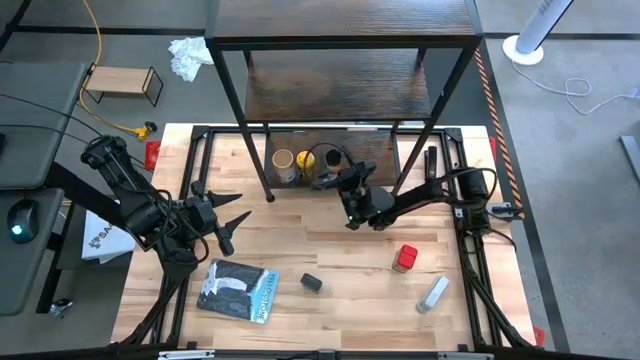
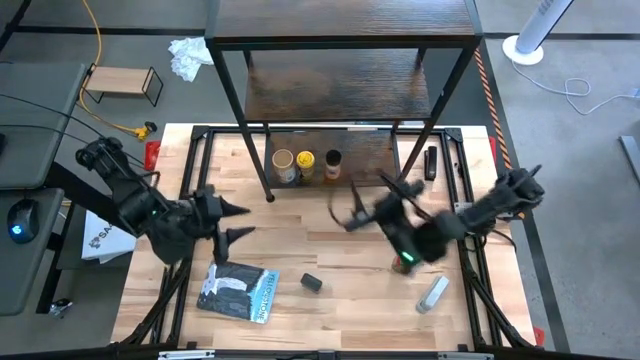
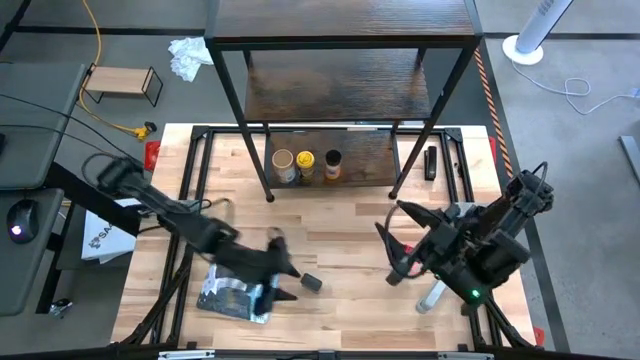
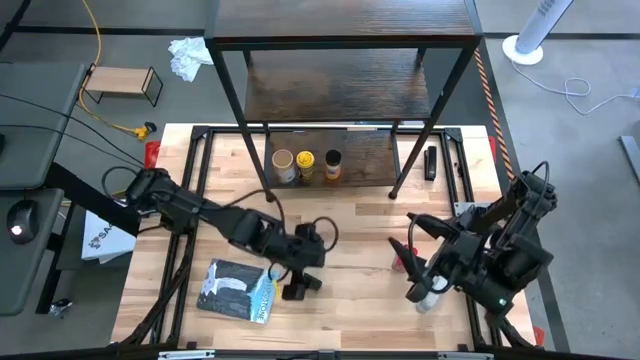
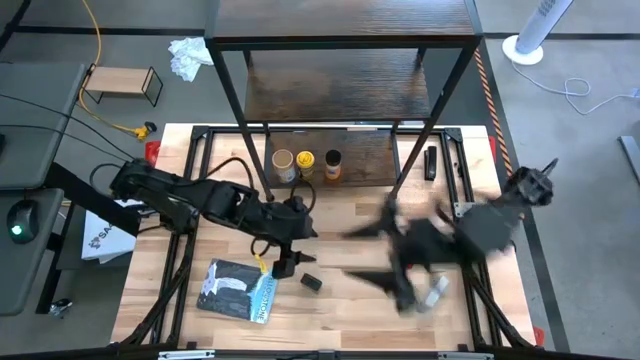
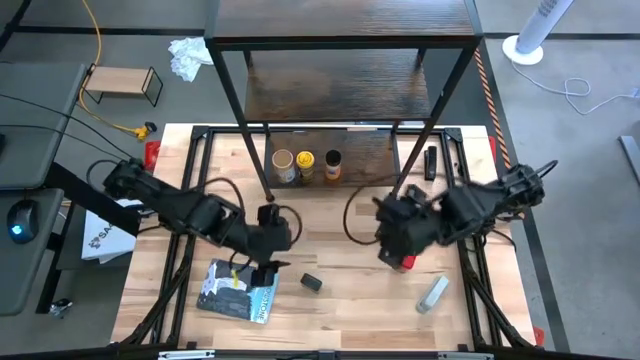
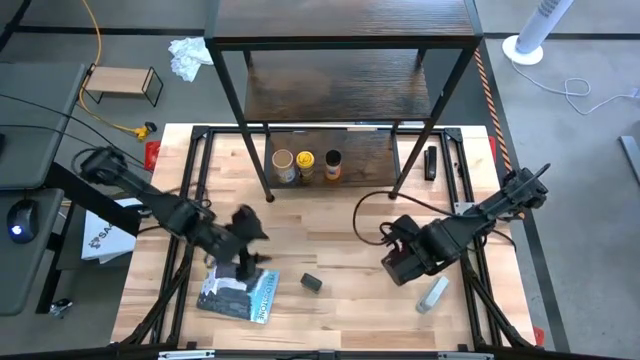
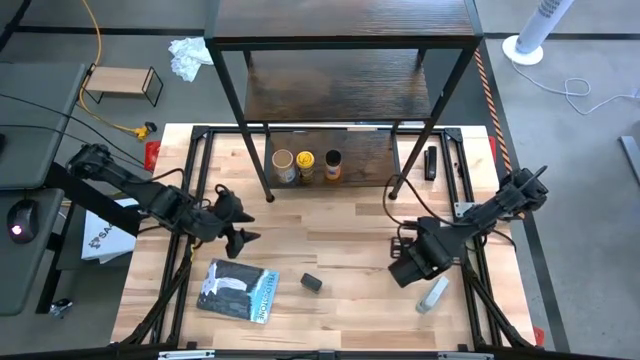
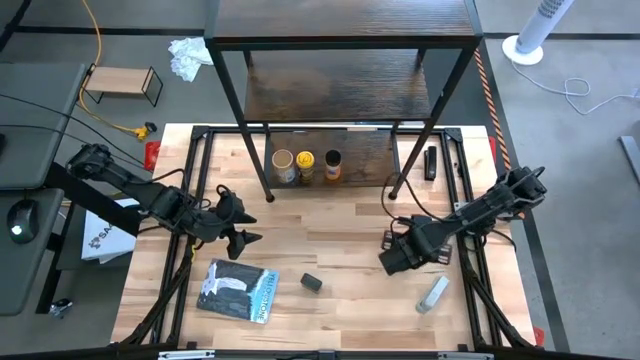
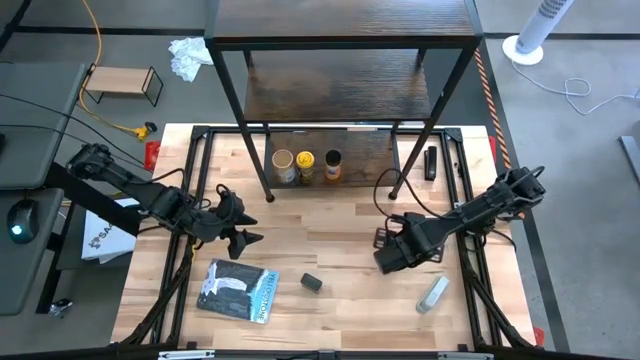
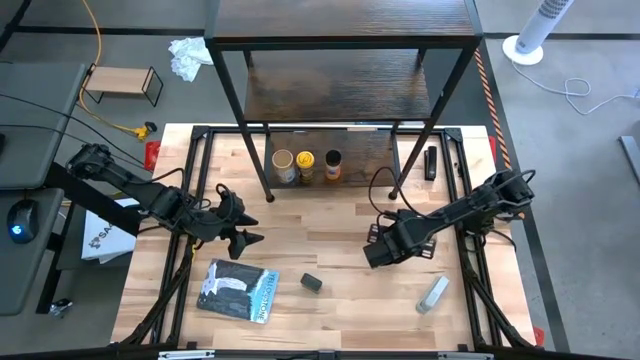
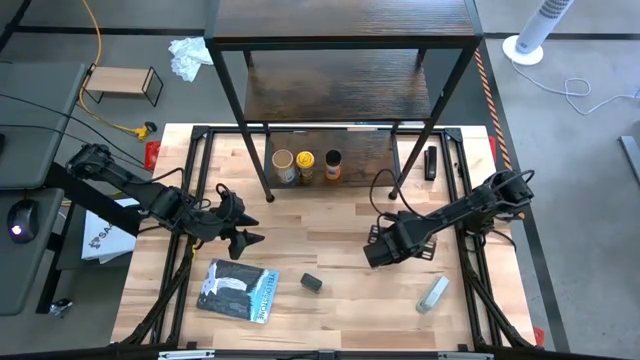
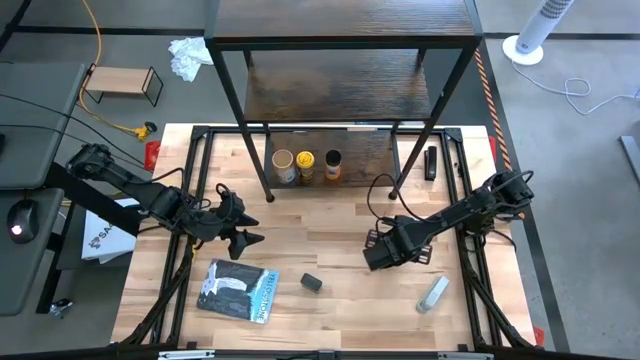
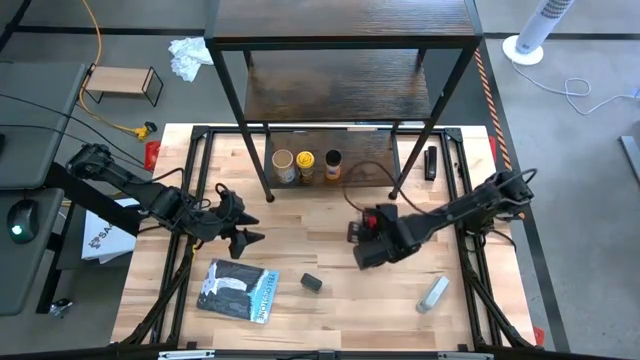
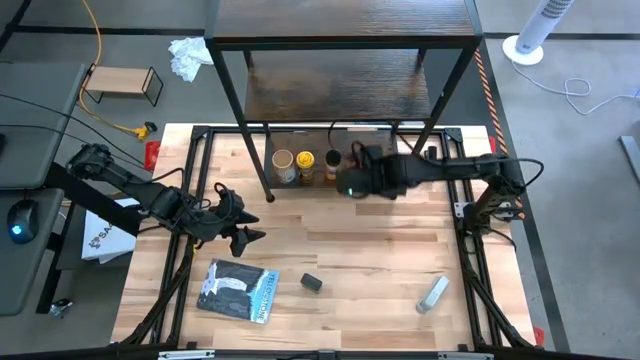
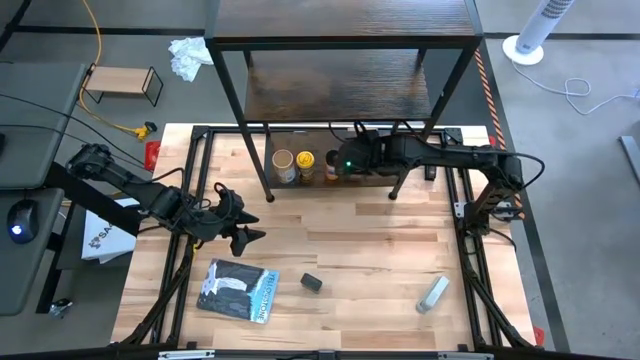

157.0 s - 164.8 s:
Task: Shelf spices
Put the red seasoning can on the shelf

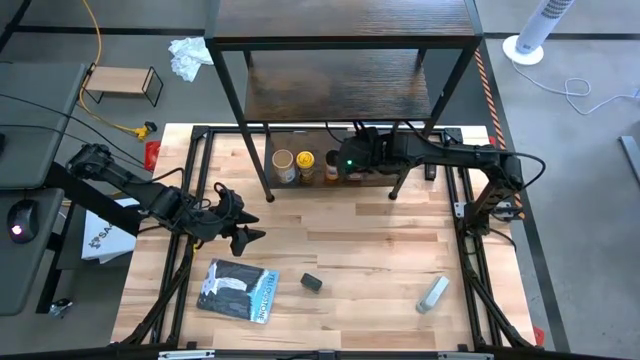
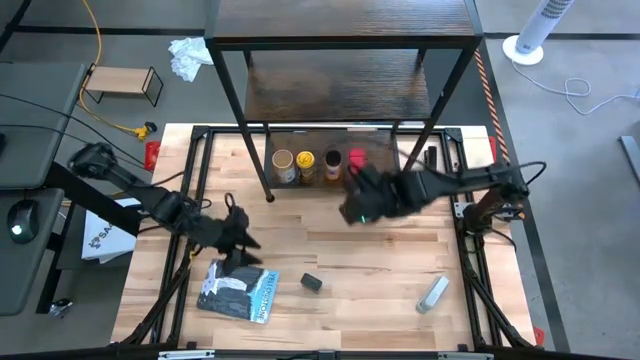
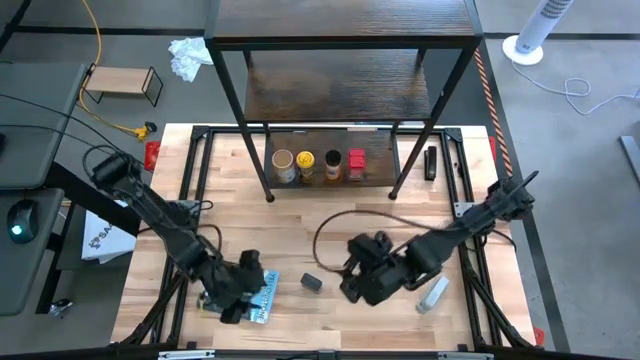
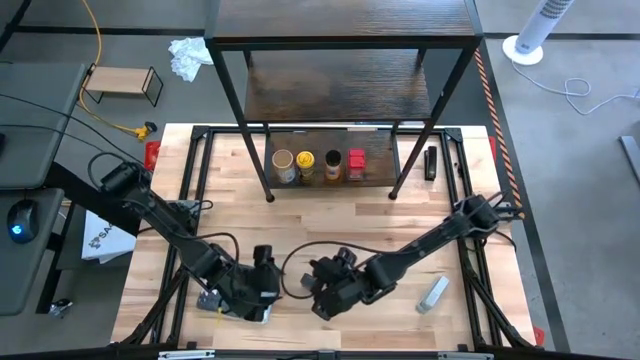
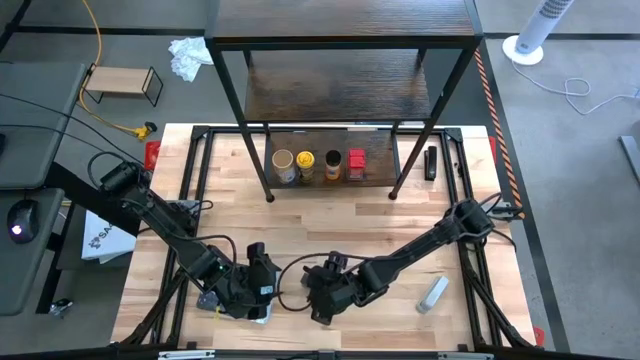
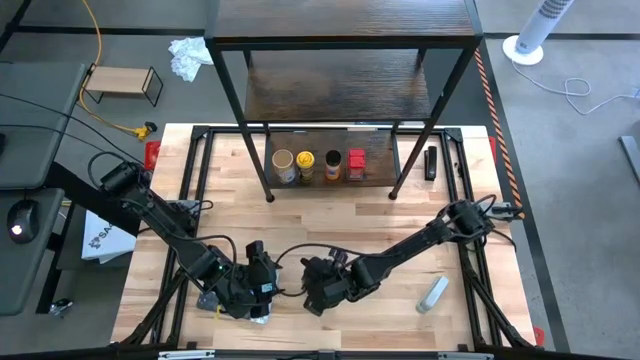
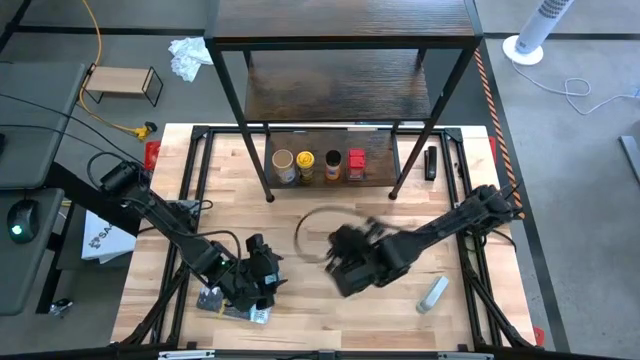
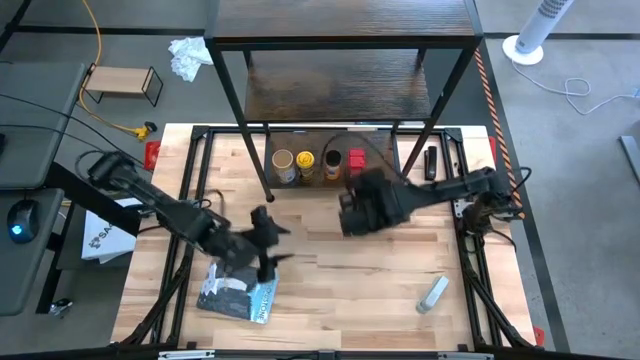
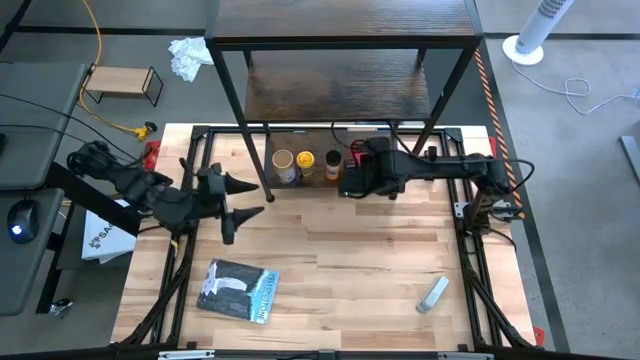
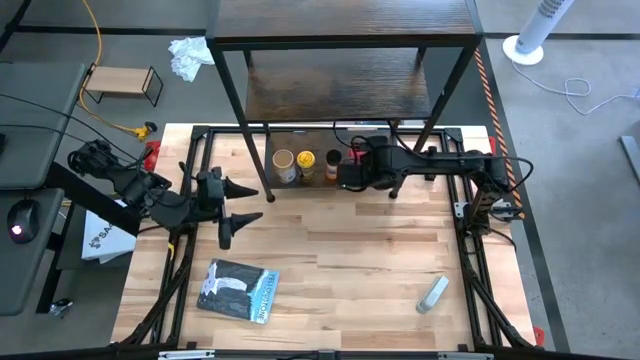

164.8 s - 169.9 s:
Put the black seasoning can on the shelf

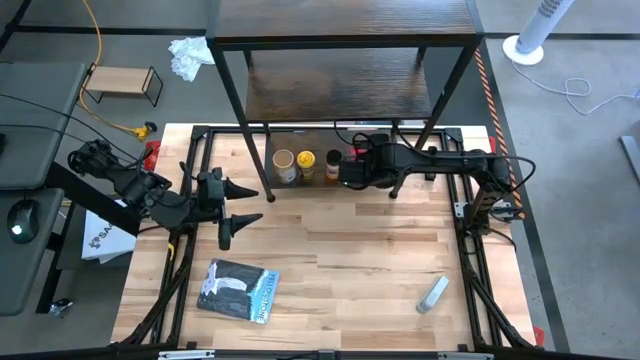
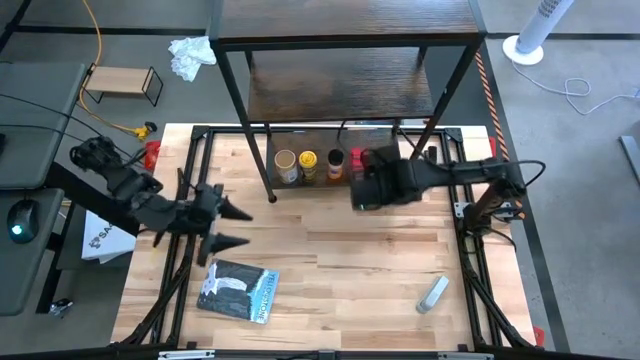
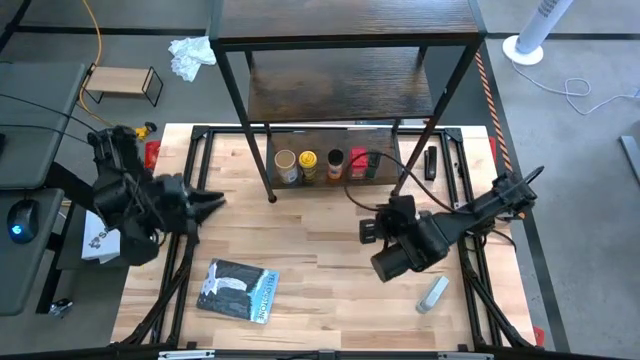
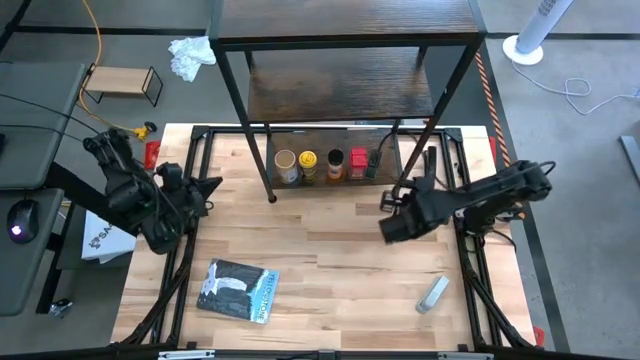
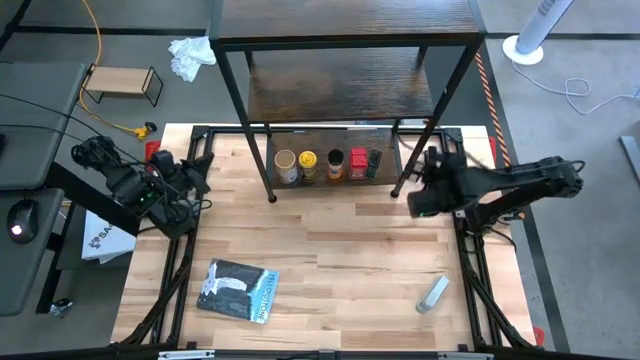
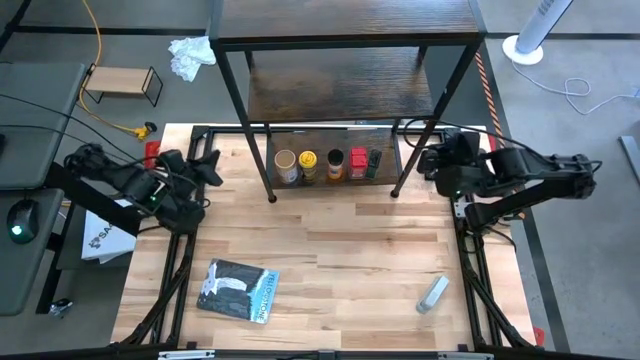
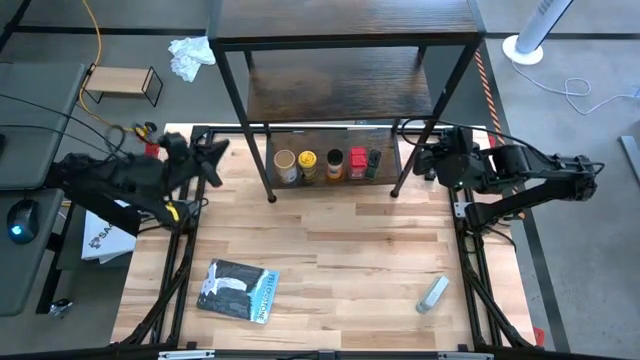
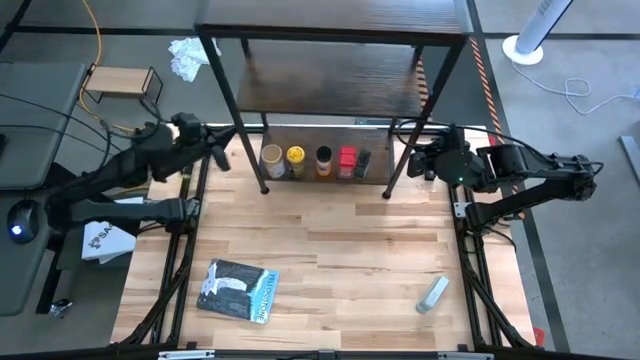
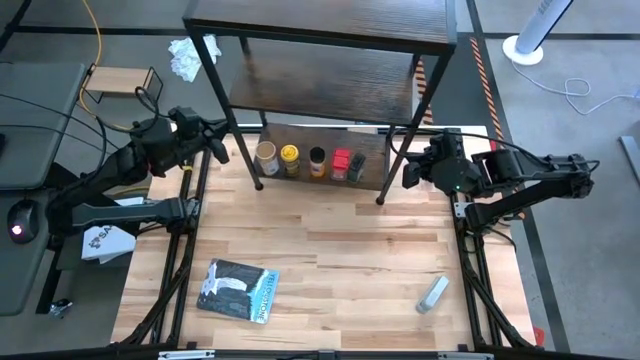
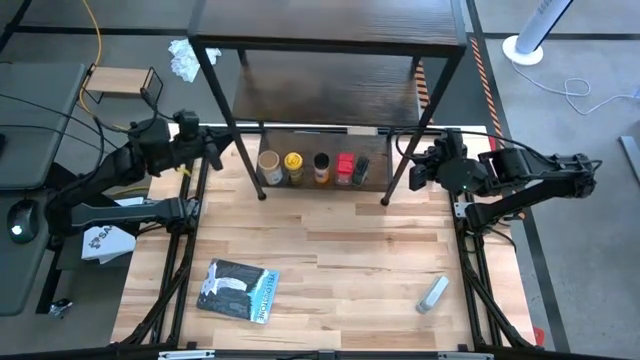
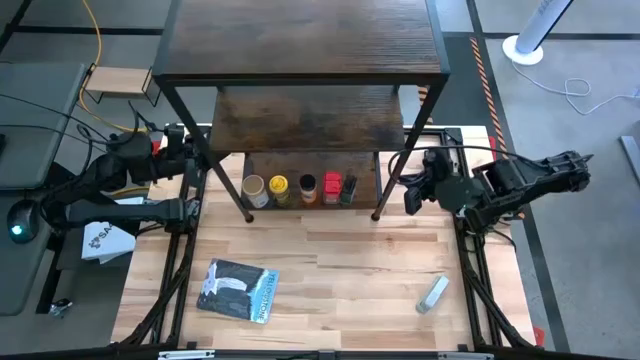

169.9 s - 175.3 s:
Adjust the shelf
